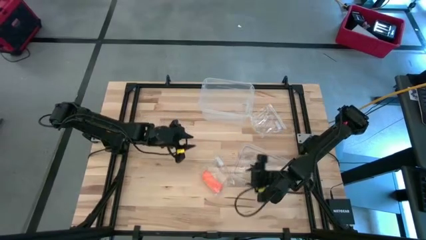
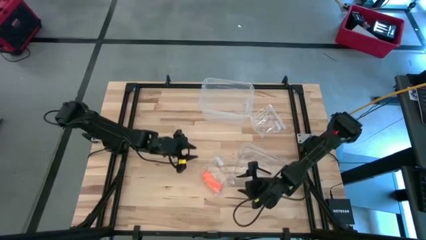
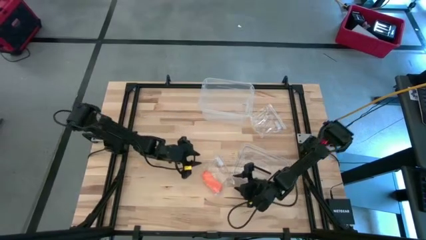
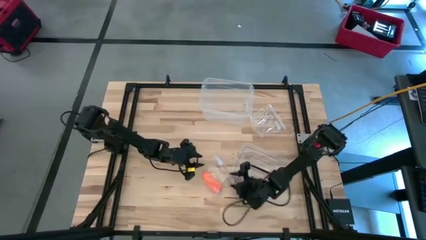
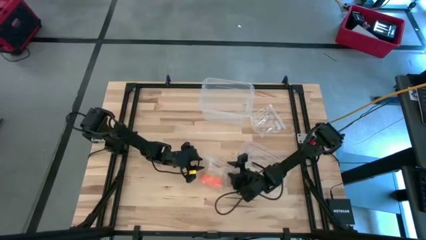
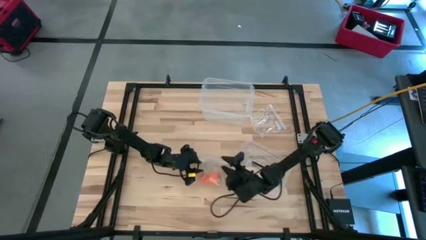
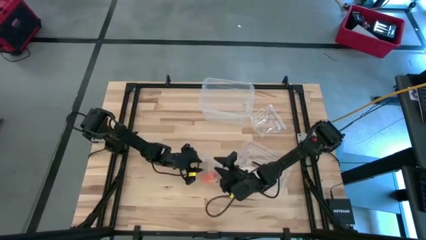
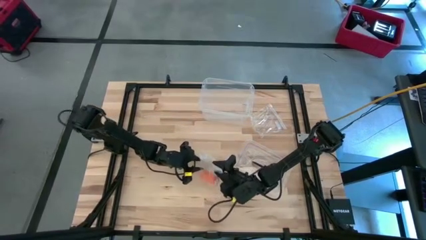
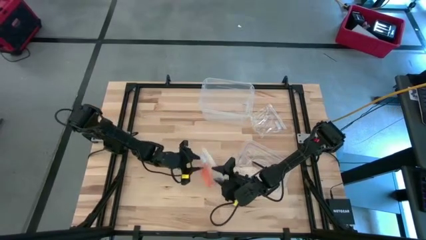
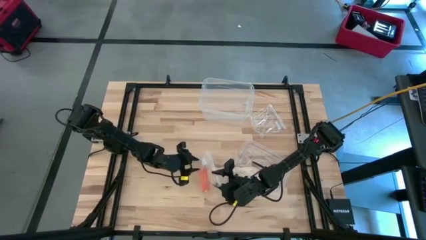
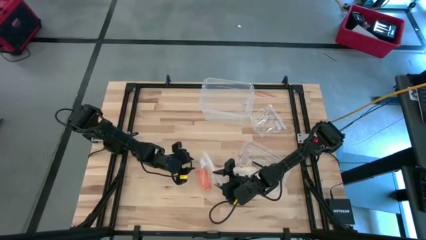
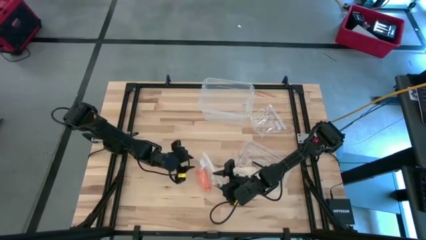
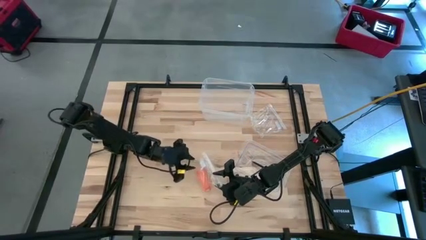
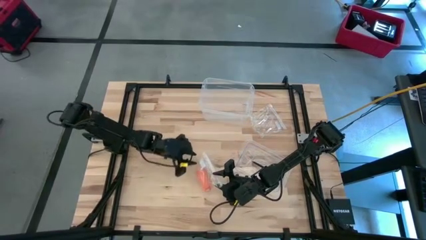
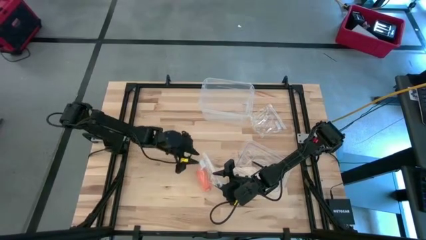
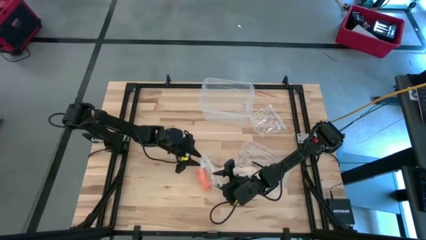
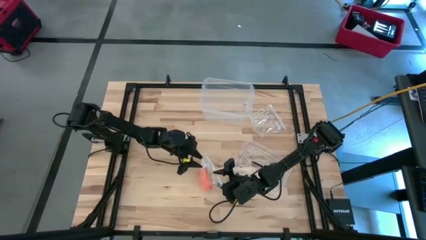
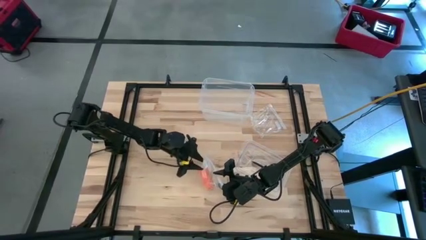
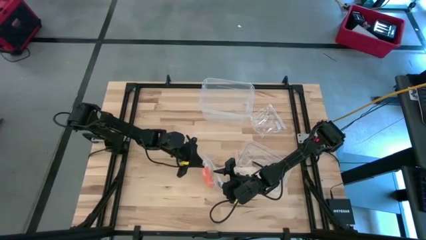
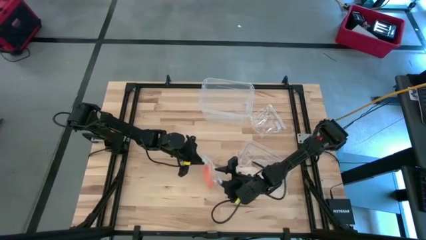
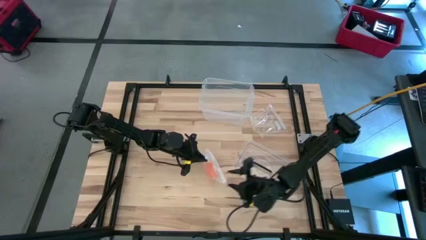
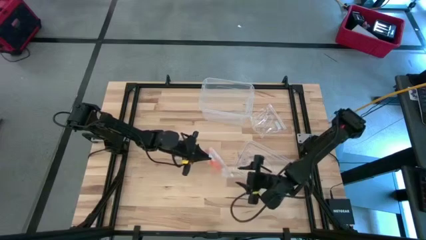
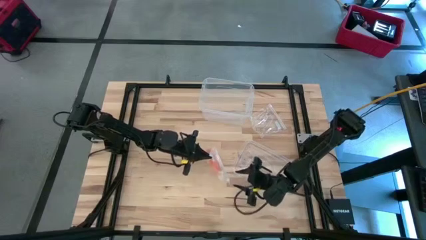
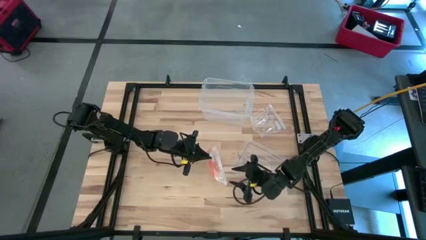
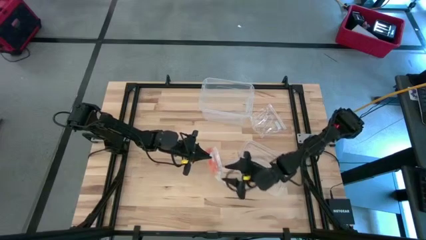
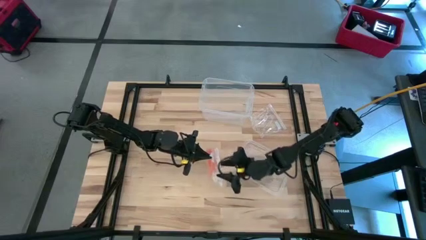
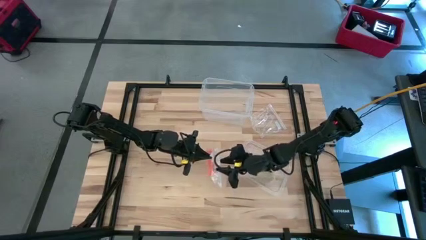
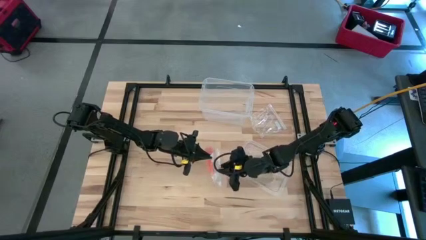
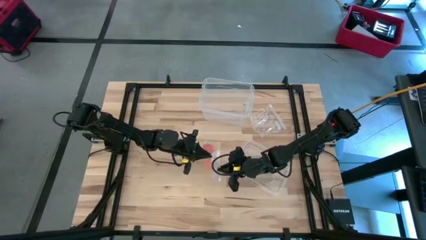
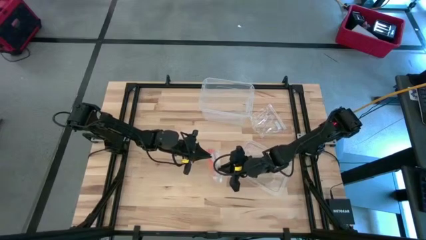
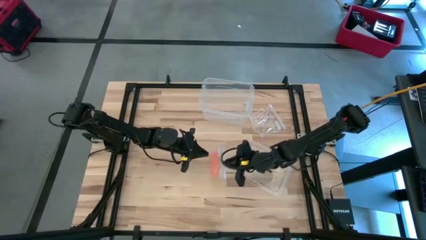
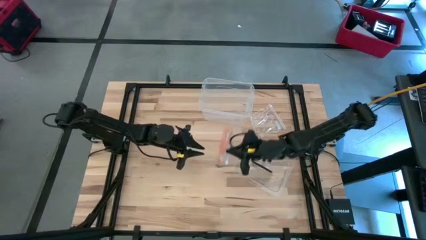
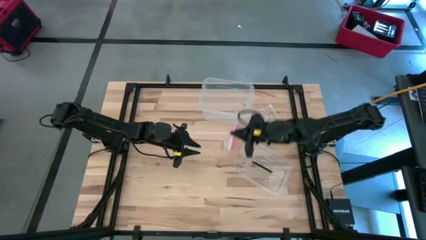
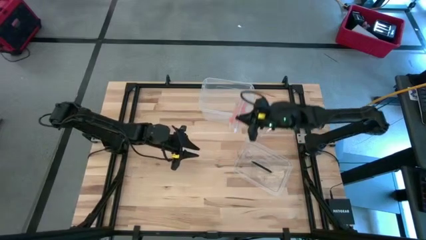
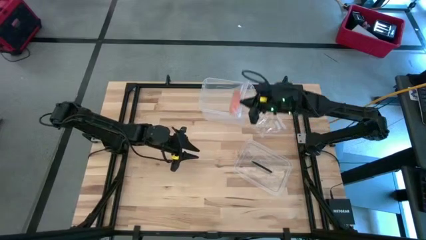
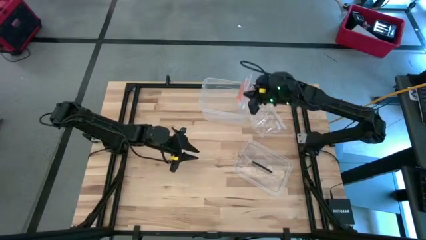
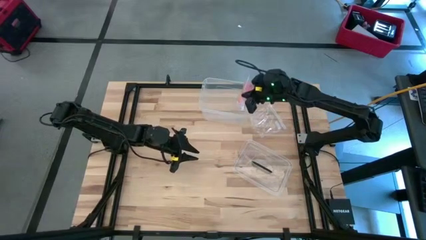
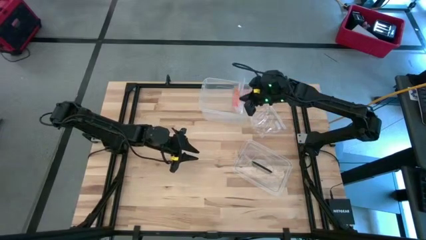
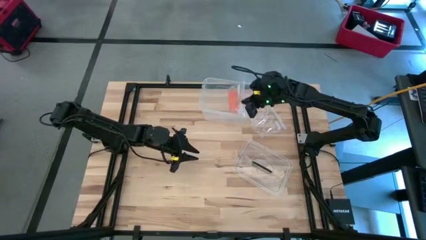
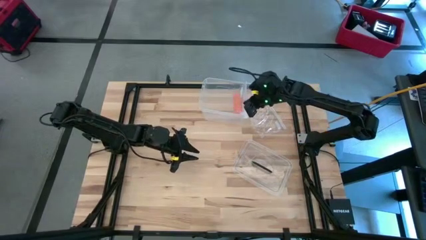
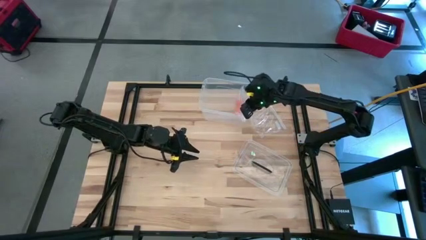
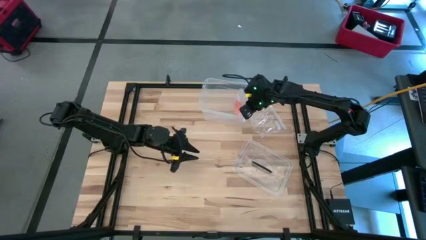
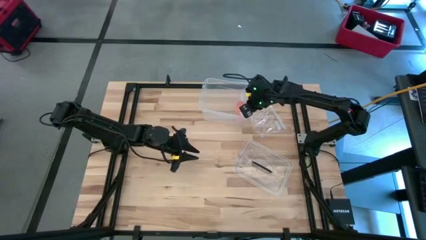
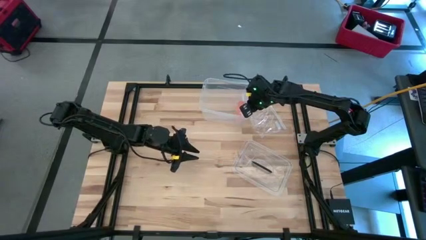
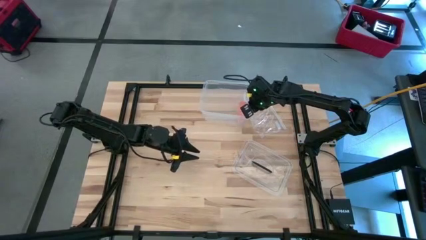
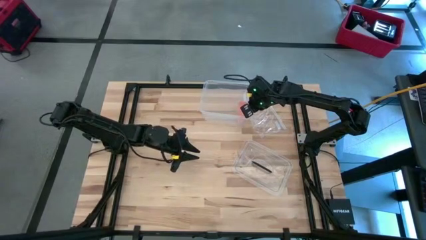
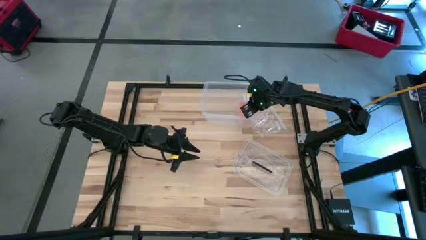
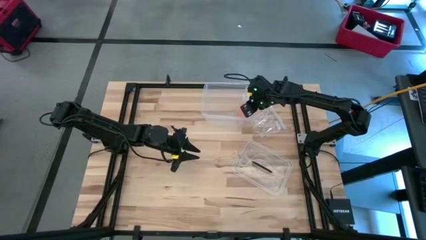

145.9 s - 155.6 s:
Task: Roll bandage
Put the transparent zip bag with the orange bandage into the transparent bin

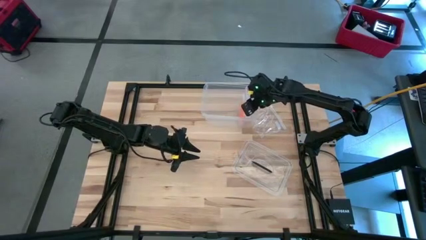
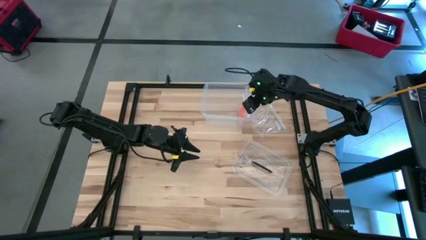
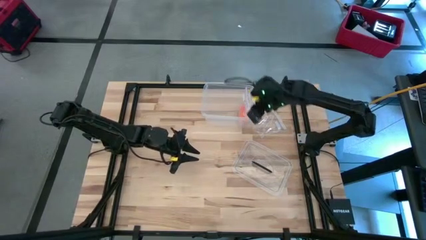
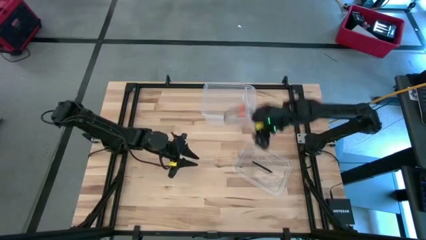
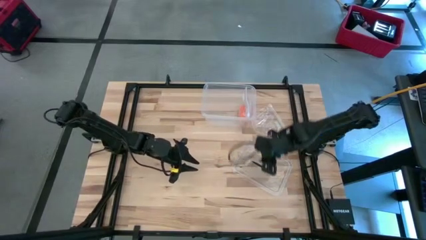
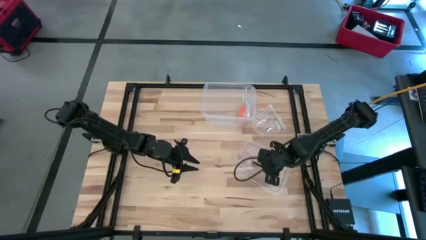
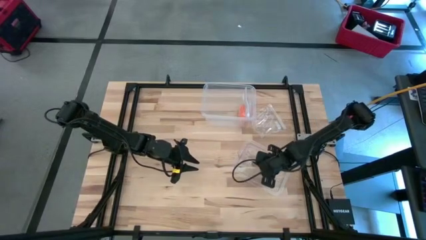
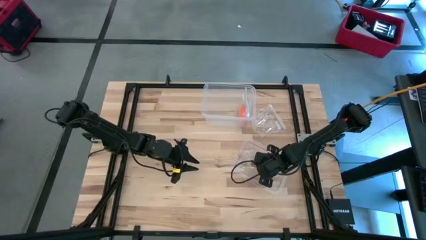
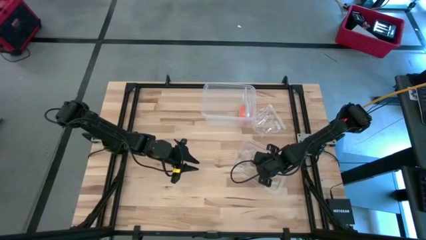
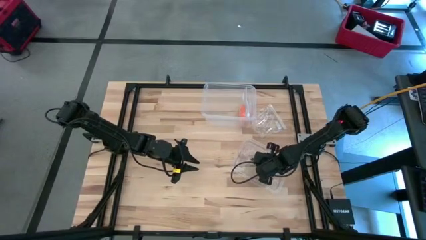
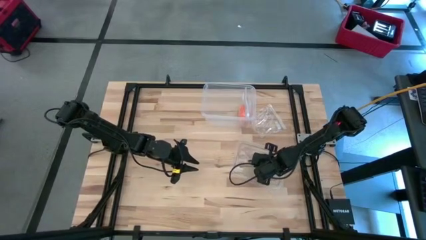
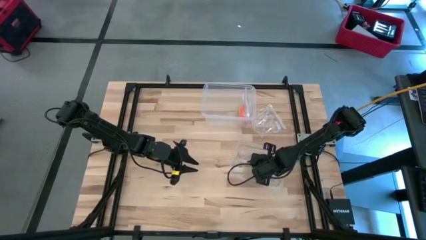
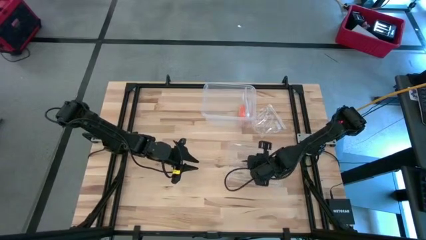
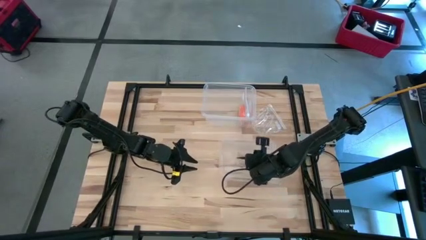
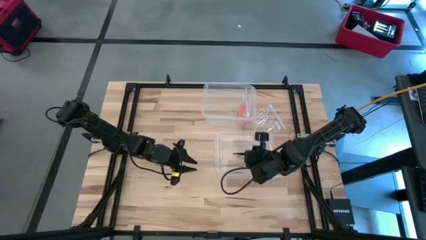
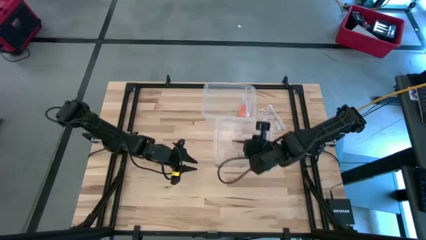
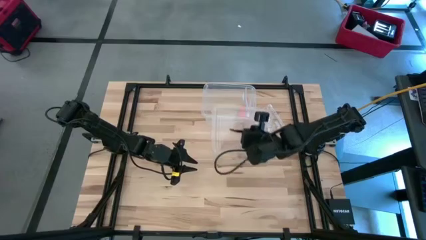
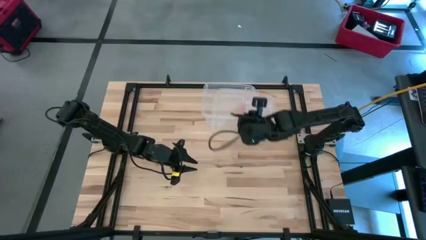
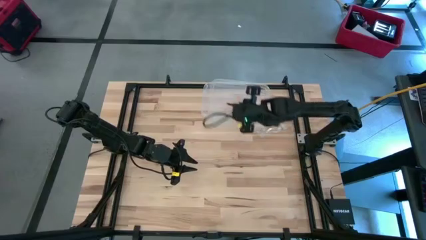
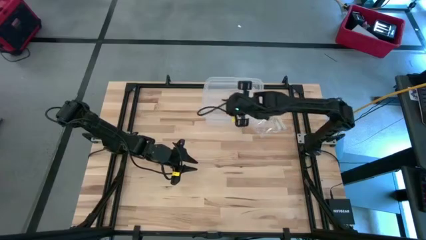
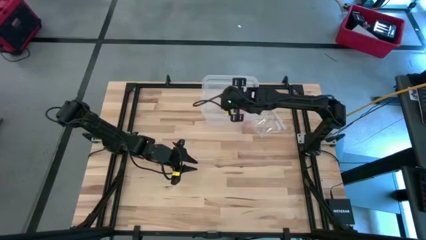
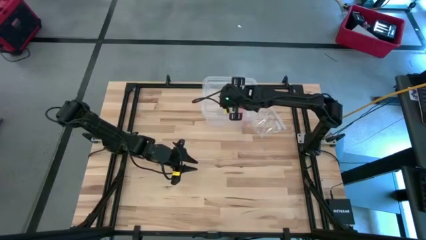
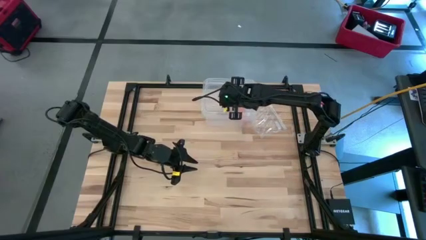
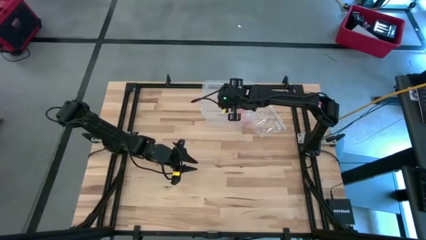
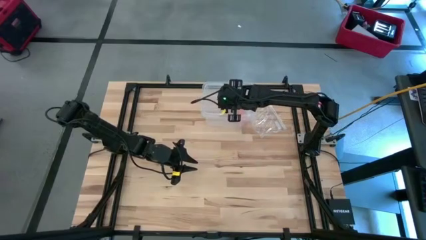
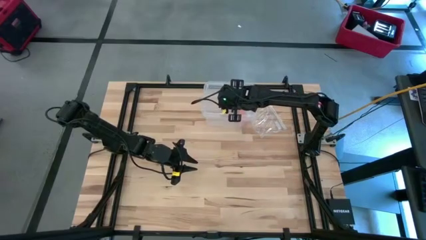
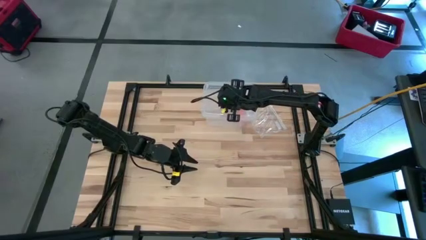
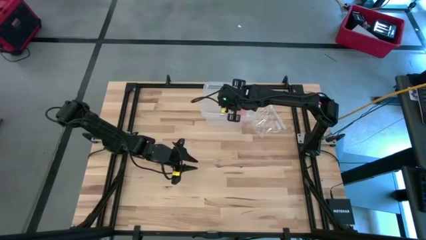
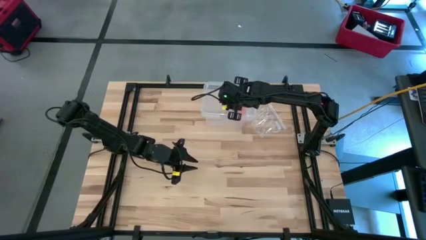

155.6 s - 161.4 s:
Close the transparent bin
